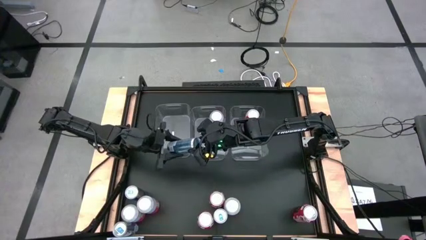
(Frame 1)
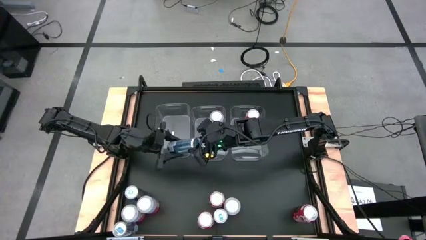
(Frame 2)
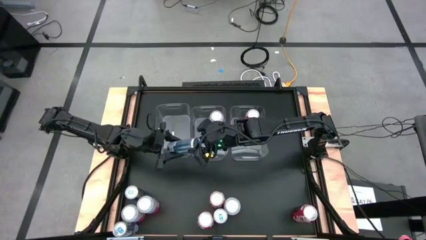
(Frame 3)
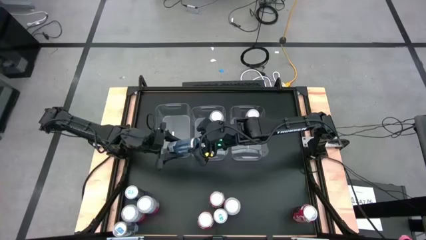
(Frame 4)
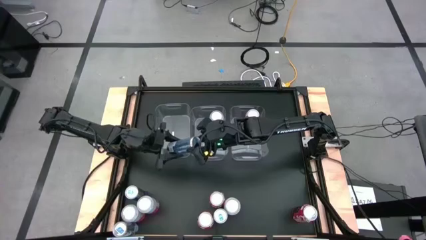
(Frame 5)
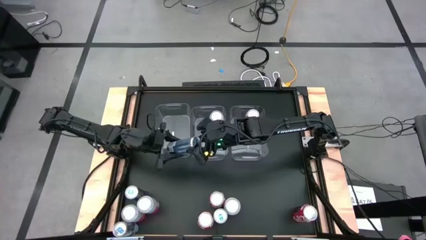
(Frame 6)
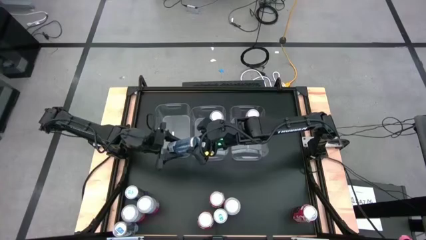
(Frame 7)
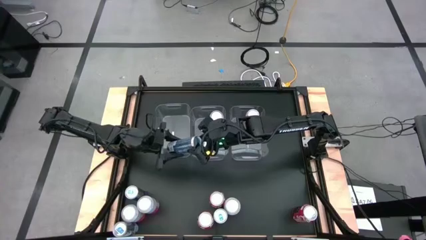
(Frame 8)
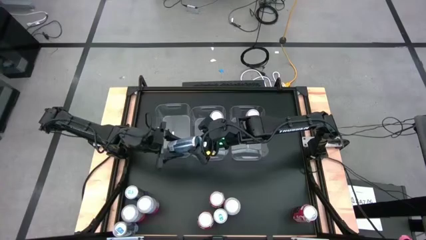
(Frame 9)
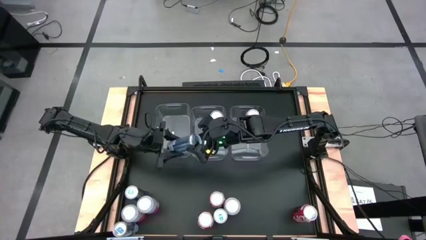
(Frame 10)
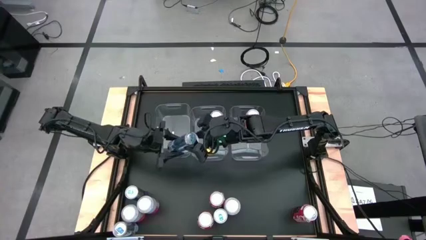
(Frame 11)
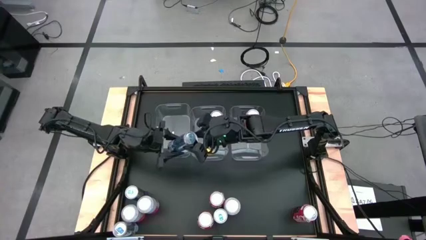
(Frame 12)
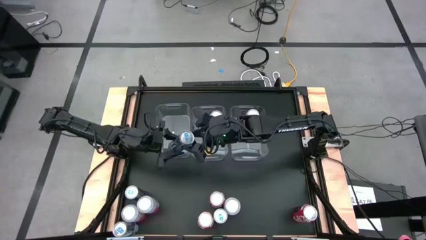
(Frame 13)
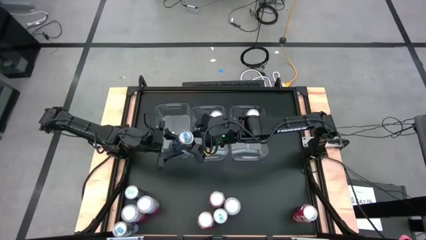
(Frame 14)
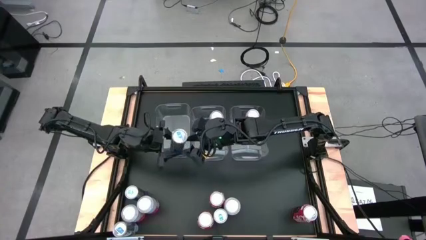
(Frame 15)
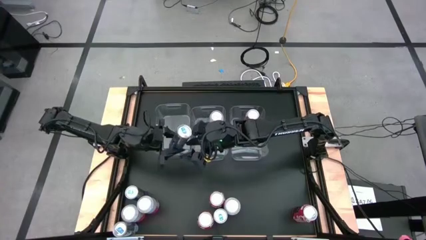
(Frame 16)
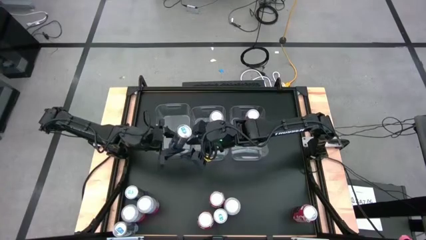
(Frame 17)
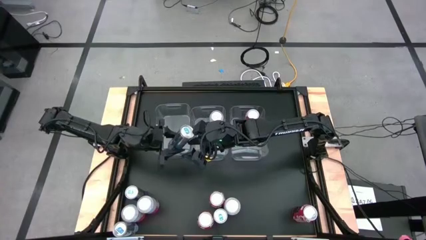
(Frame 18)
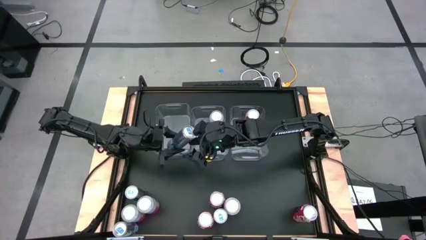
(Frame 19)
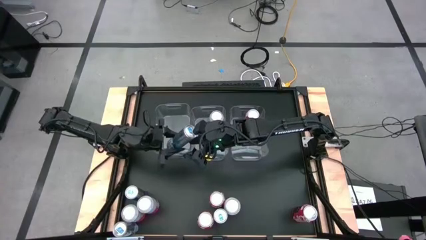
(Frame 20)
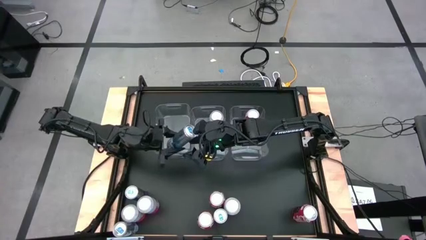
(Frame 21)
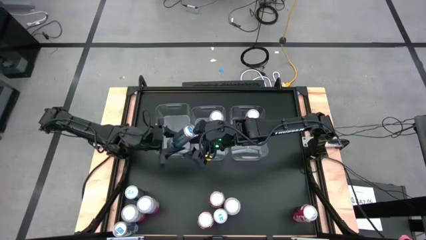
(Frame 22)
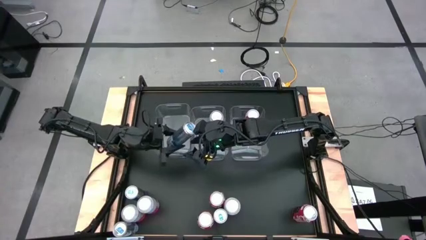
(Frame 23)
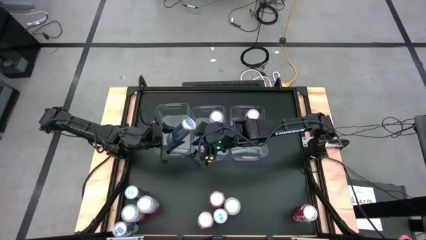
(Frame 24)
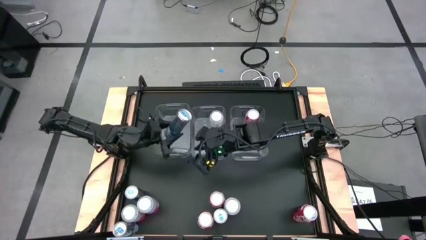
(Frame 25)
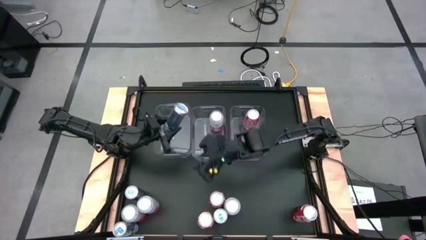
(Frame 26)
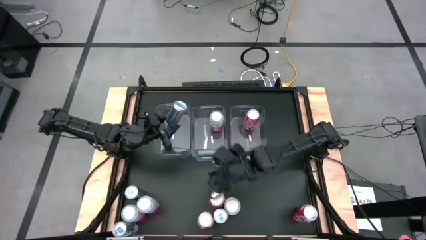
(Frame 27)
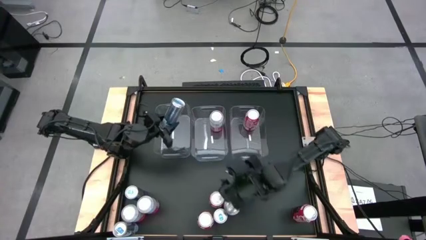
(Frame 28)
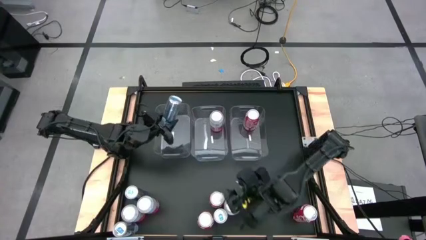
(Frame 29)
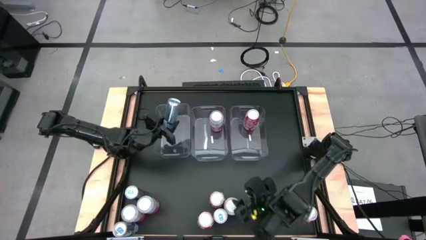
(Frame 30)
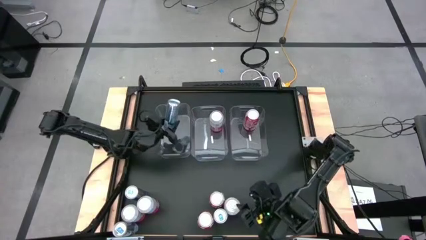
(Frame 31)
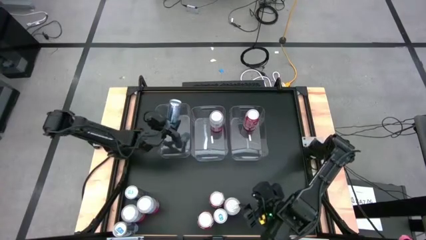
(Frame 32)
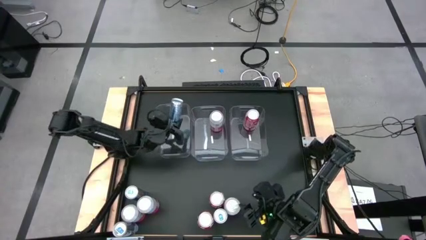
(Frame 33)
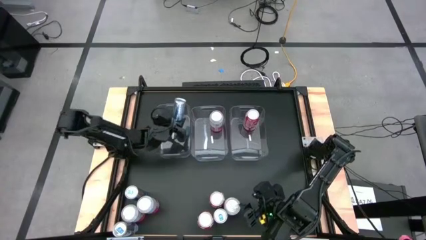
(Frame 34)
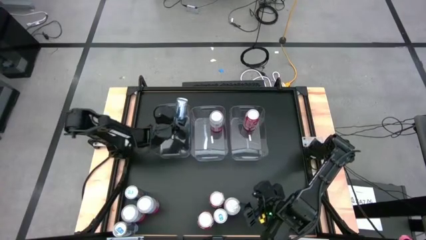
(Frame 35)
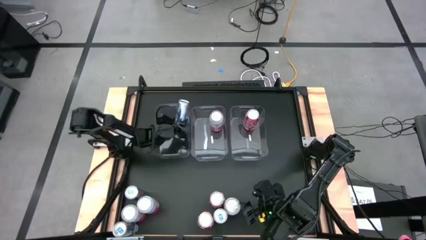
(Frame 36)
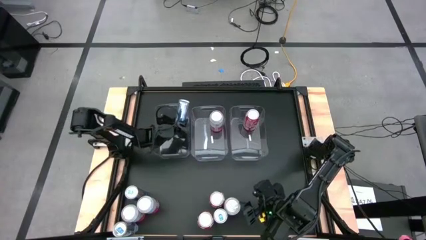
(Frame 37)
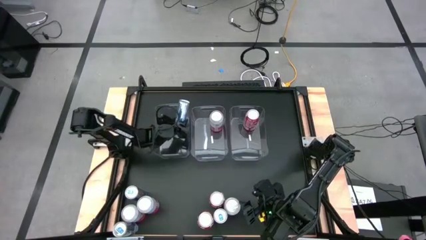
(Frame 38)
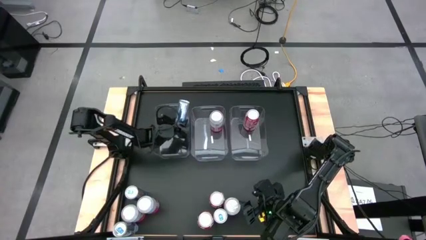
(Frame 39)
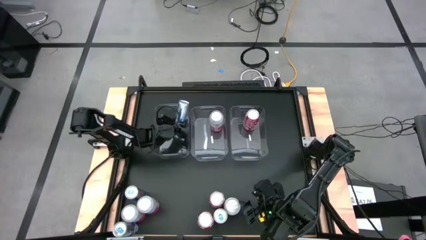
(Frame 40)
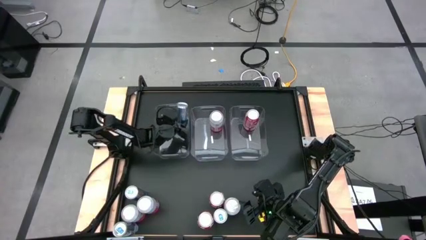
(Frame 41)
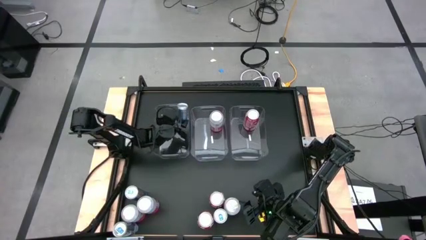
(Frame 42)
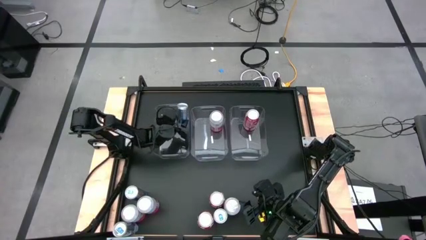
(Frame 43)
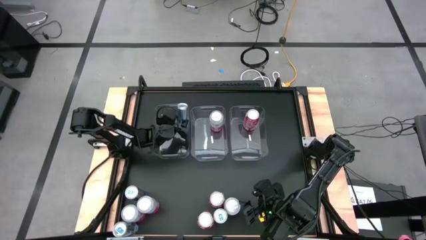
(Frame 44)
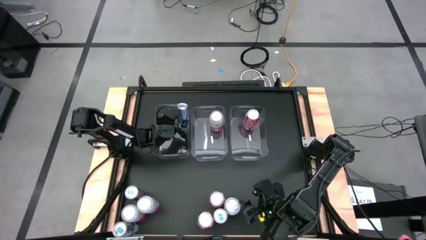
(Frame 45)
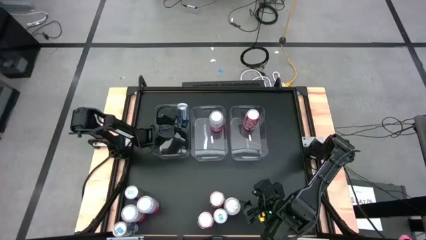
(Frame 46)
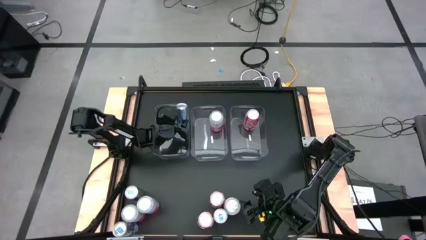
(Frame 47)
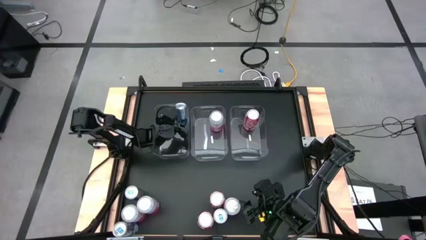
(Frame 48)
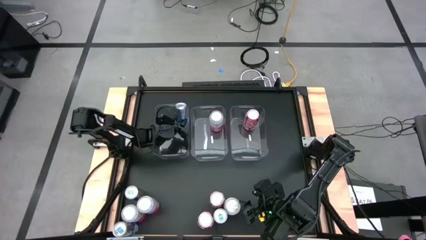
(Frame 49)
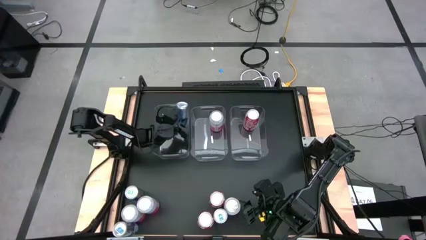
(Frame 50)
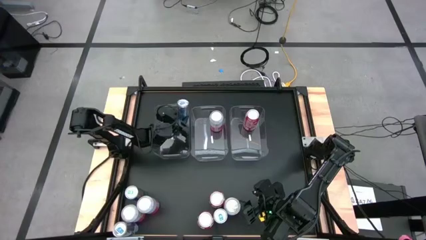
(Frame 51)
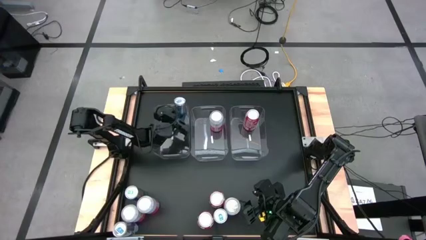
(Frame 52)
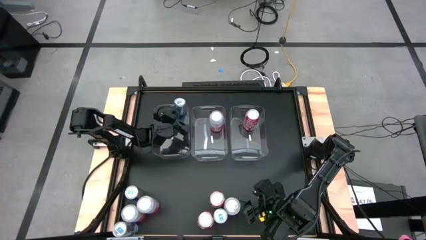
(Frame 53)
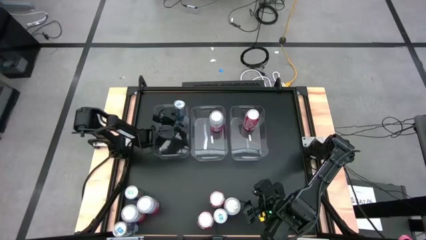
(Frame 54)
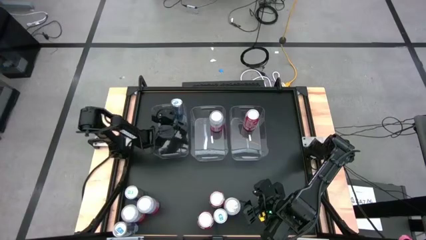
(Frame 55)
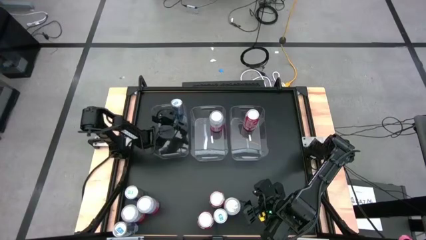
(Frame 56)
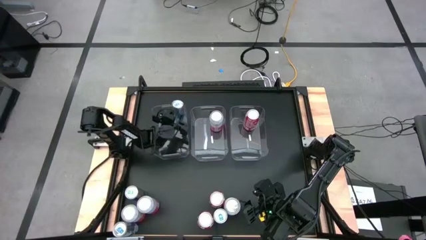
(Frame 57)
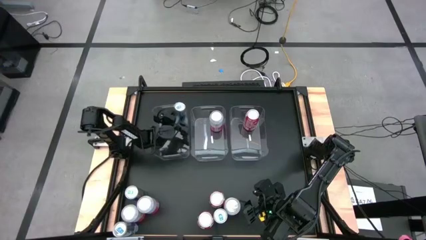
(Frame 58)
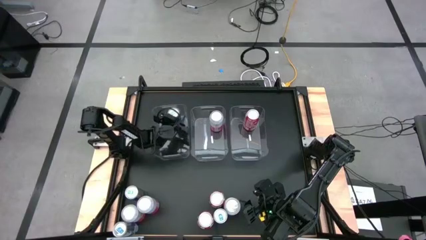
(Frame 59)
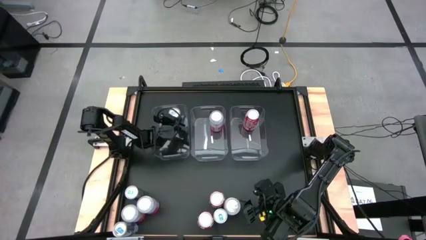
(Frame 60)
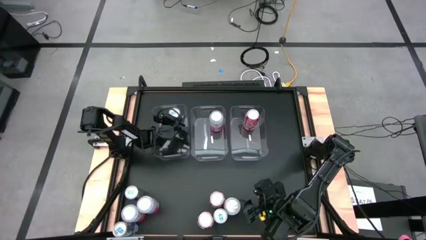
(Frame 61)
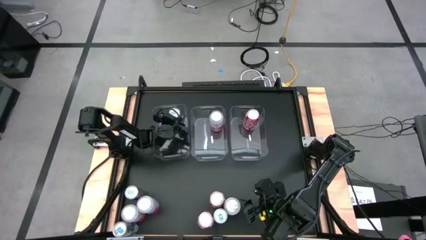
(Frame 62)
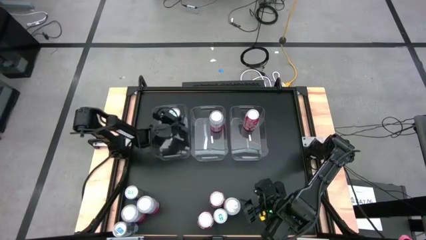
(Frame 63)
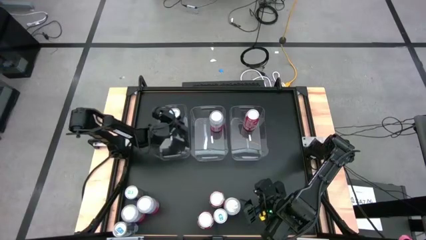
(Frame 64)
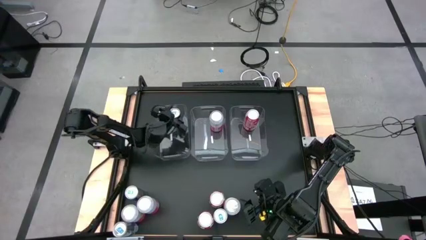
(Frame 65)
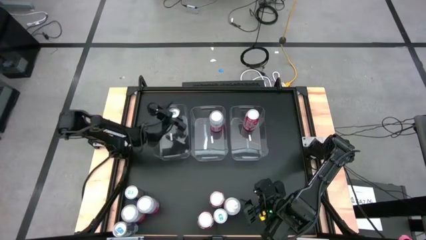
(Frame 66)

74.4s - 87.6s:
Task: Sort soda cans
Put the blue soda can into the left transparent bin

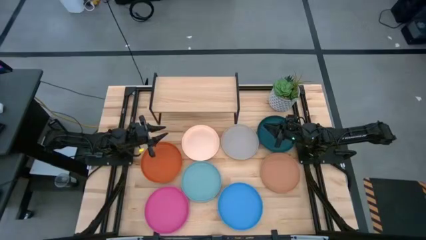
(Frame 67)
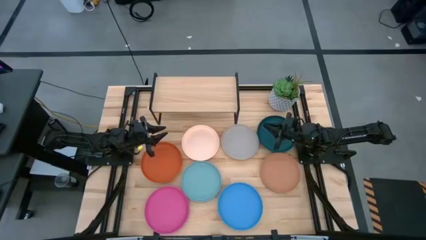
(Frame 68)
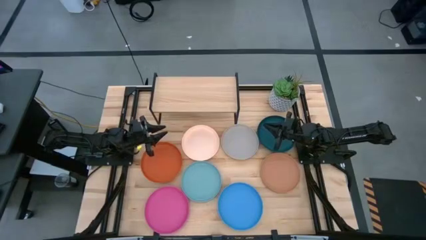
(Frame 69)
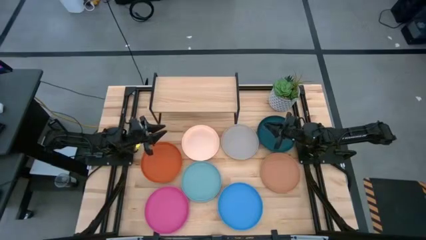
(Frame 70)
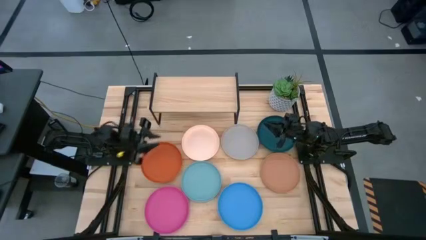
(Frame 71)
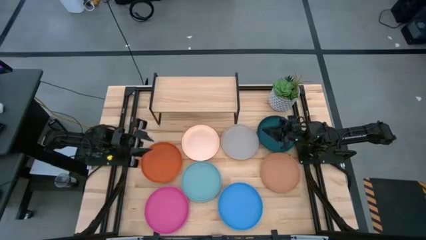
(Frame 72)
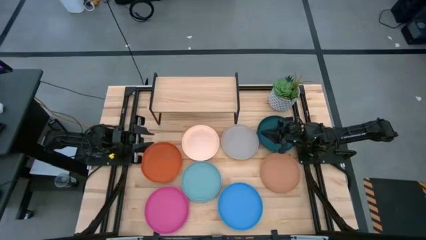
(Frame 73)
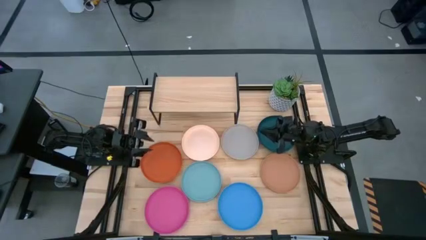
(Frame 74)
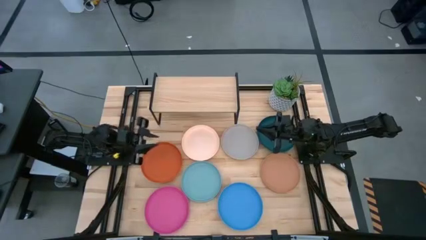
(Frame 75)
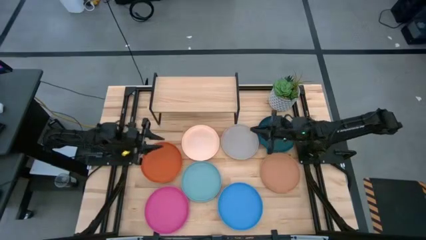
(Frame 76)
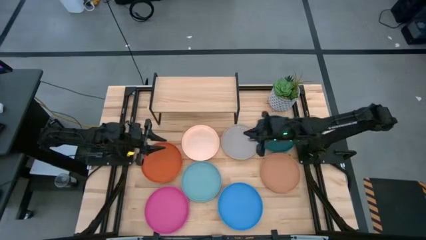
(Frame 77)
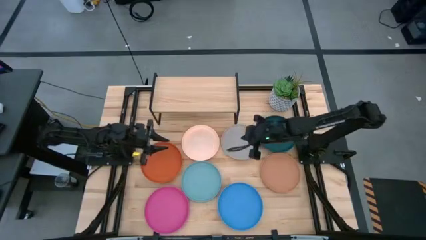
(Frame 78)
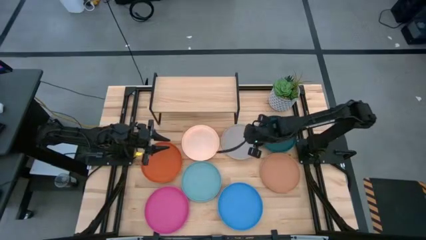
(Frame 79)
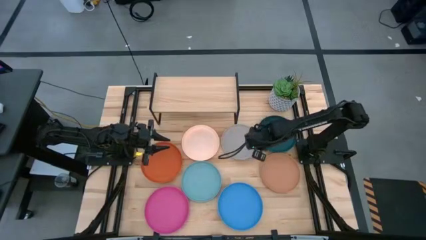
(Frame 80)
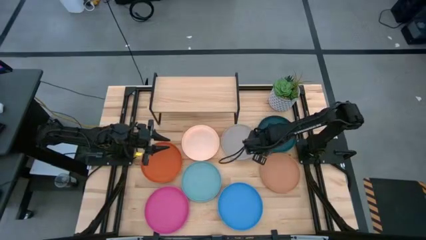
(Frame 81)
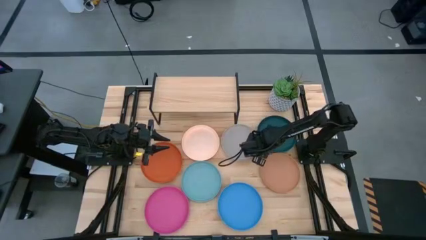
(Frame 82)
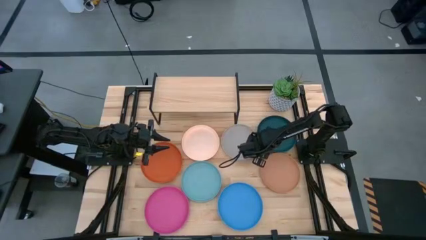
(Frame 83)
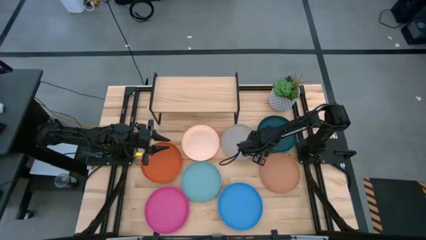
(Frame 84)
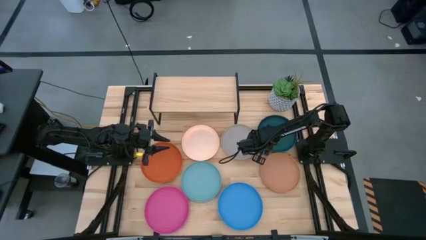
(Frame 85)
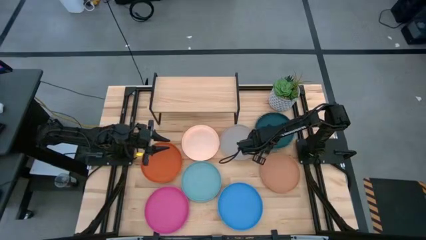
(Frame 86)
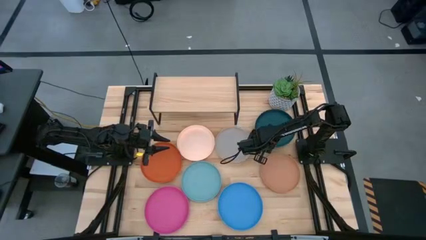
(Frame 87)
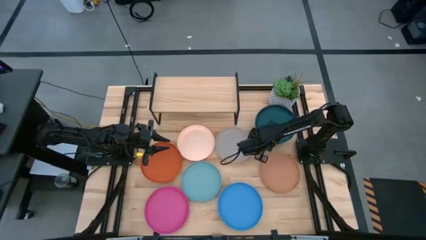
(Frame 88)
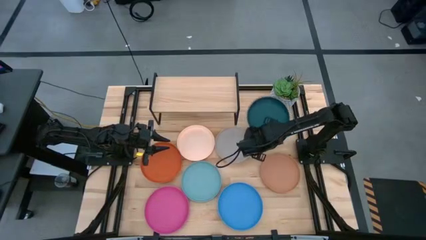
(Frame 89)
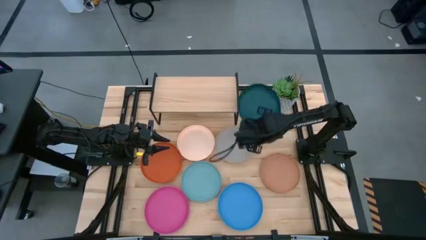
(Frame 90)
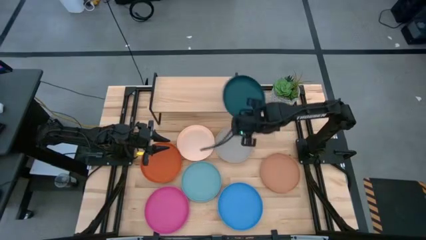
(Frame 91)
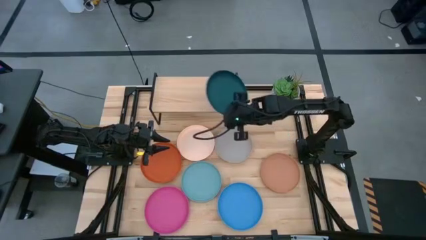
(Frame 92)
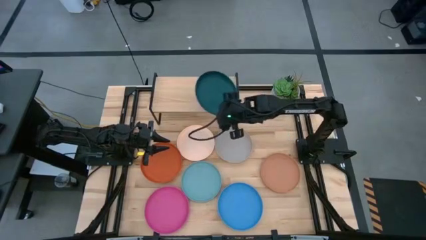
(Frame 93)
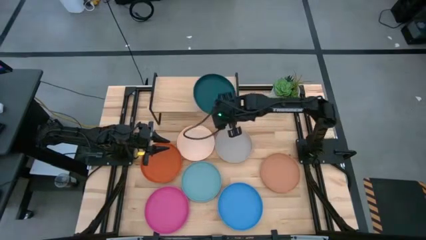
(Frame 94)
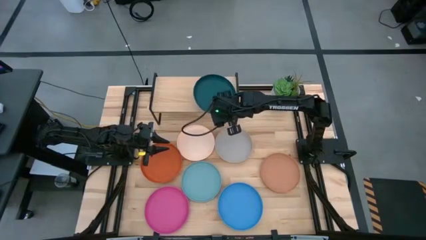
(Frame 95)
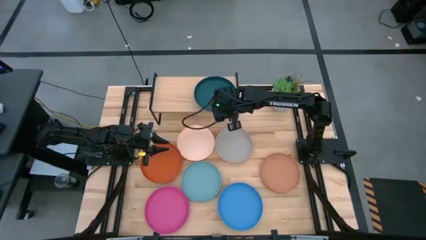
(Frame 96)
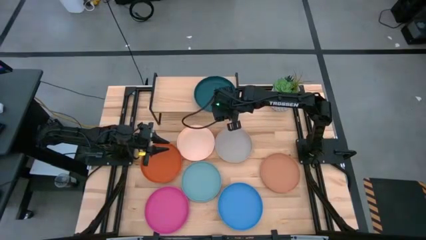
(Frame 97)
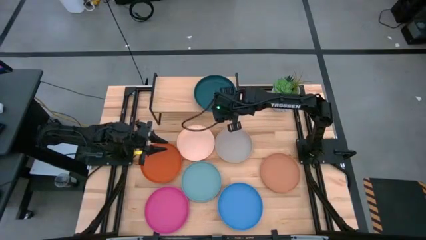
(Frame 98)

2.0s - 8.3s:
Task: Place and stack plates onto a shelf
Put the dark green plate on the shelf
